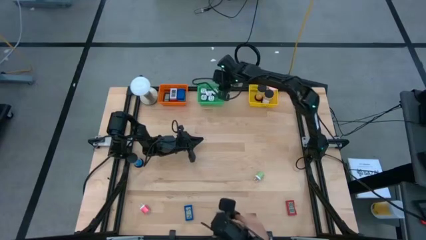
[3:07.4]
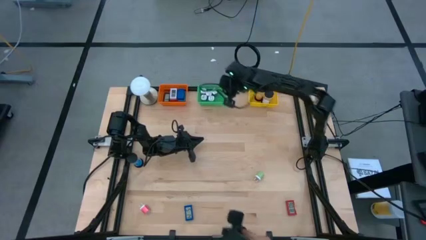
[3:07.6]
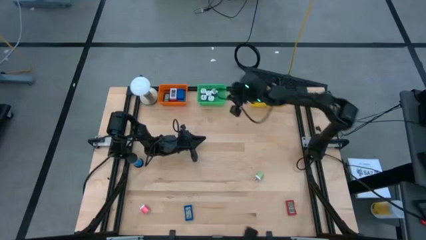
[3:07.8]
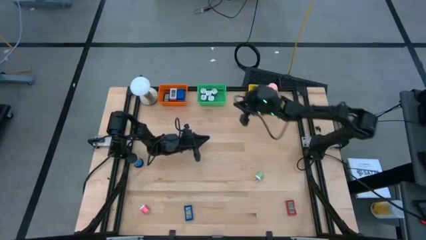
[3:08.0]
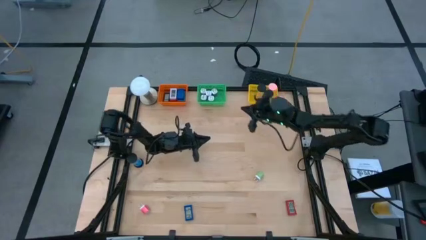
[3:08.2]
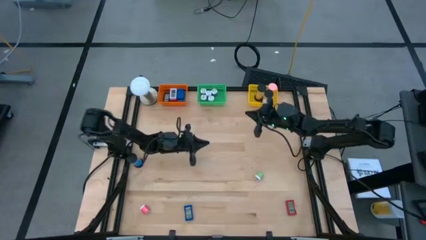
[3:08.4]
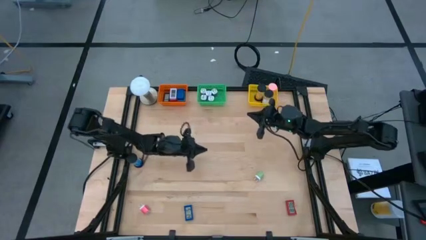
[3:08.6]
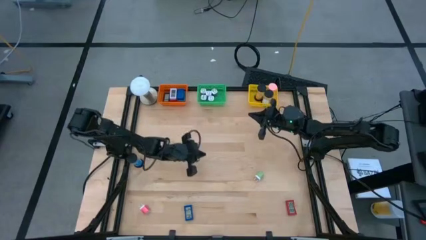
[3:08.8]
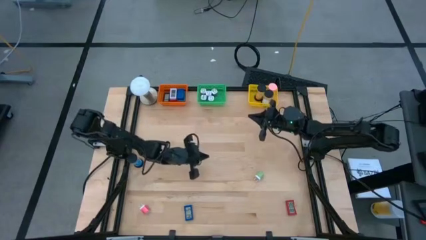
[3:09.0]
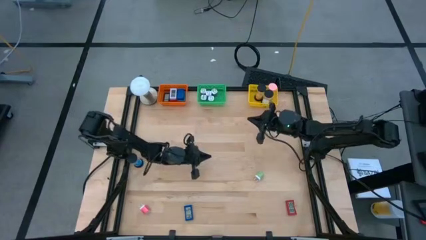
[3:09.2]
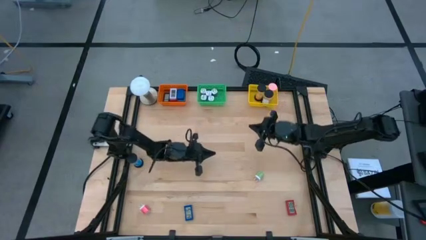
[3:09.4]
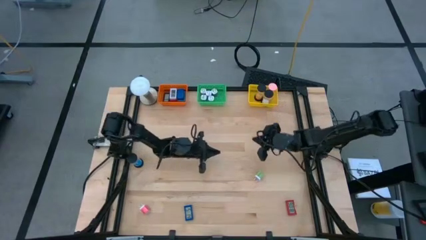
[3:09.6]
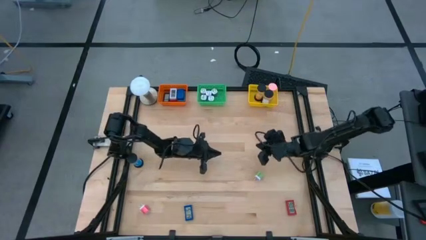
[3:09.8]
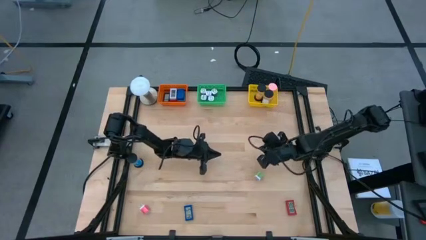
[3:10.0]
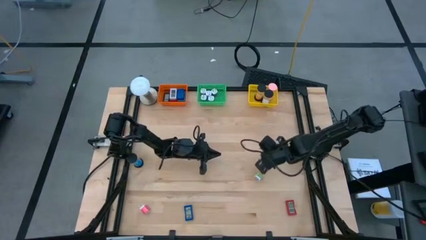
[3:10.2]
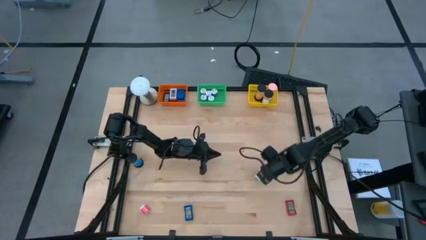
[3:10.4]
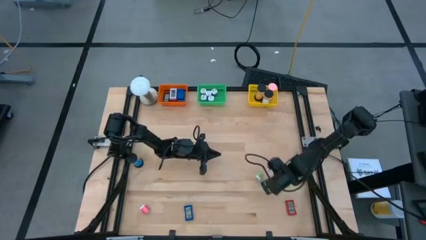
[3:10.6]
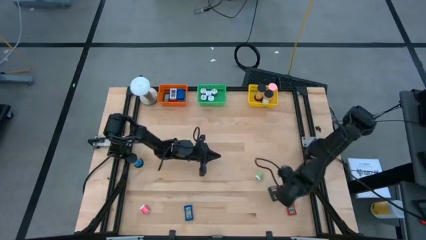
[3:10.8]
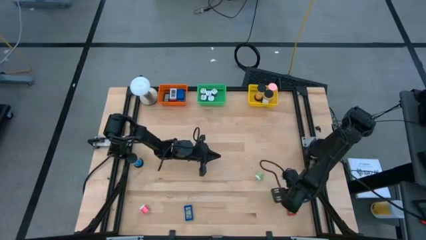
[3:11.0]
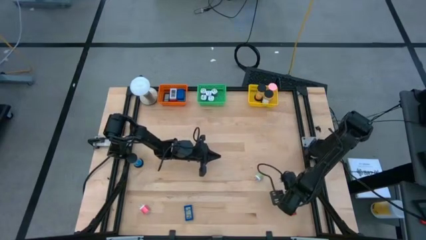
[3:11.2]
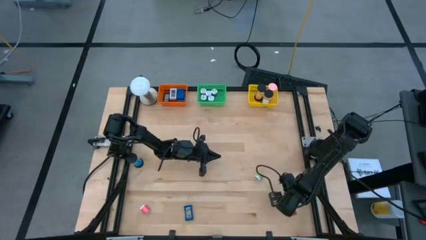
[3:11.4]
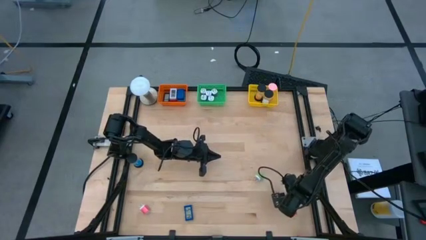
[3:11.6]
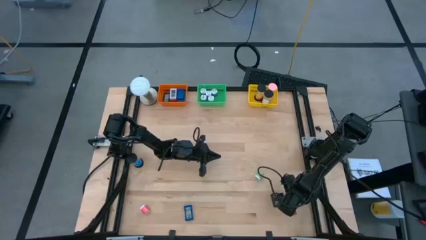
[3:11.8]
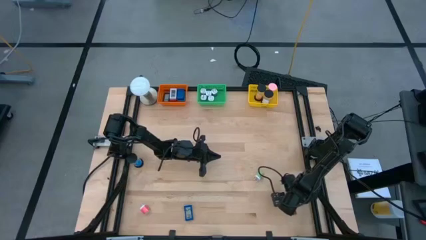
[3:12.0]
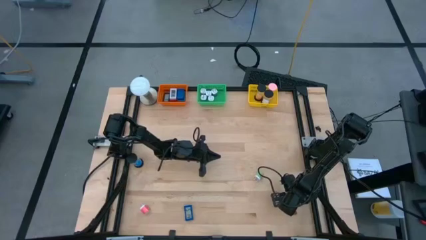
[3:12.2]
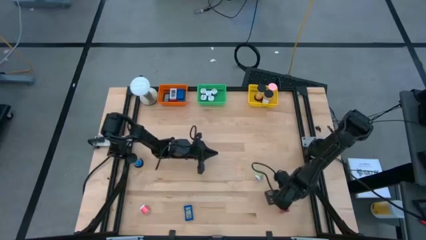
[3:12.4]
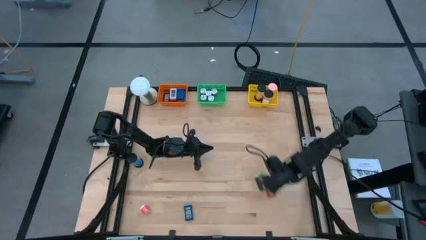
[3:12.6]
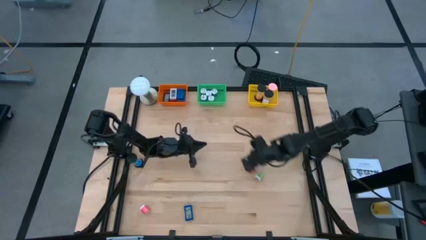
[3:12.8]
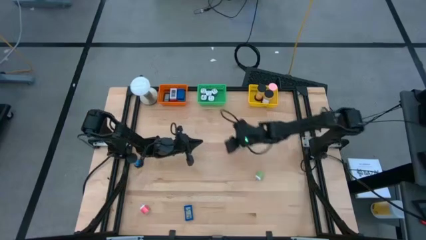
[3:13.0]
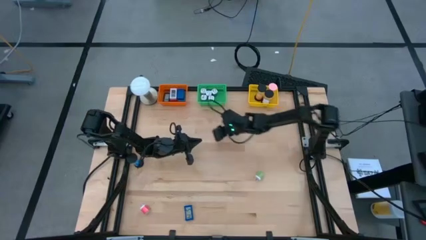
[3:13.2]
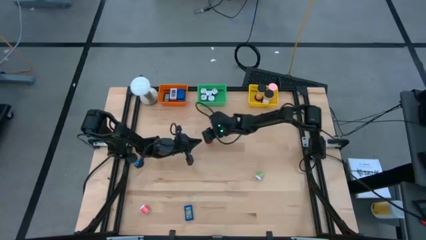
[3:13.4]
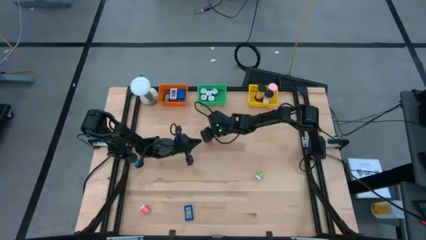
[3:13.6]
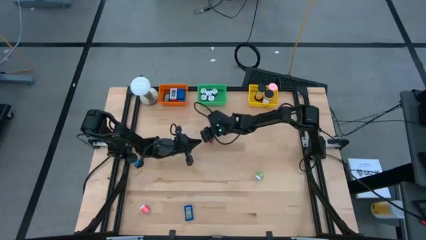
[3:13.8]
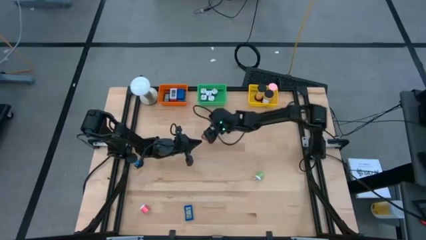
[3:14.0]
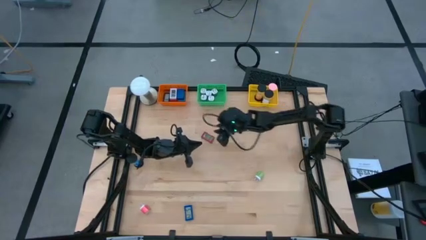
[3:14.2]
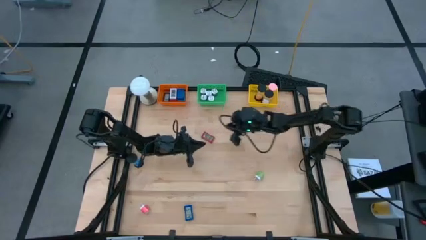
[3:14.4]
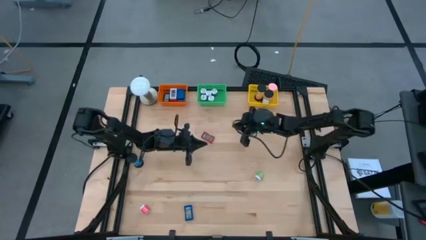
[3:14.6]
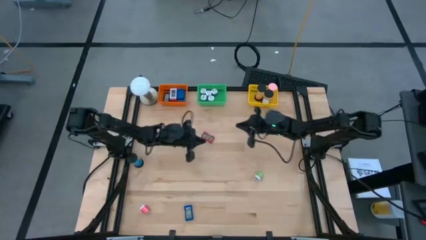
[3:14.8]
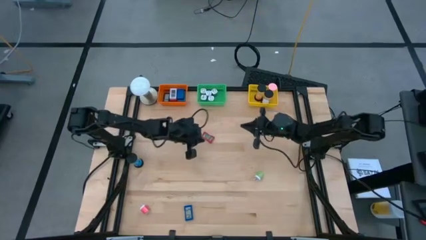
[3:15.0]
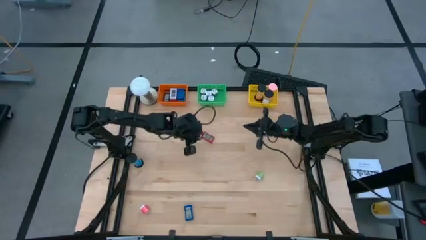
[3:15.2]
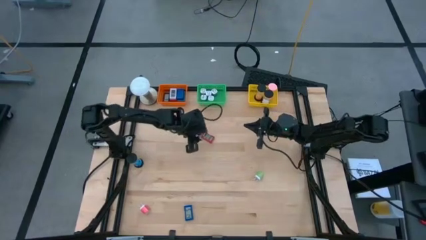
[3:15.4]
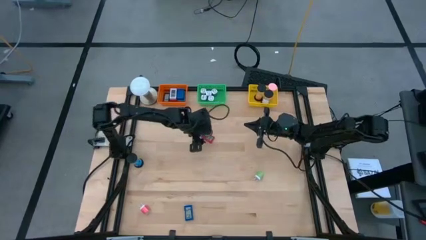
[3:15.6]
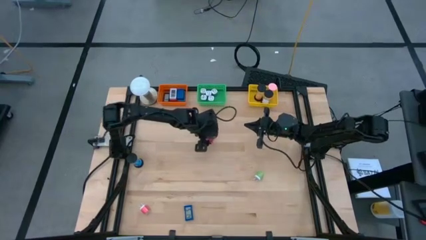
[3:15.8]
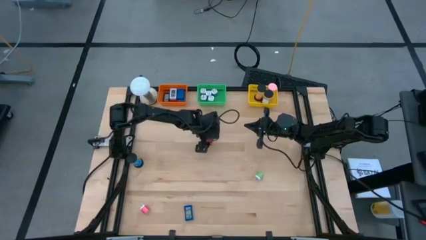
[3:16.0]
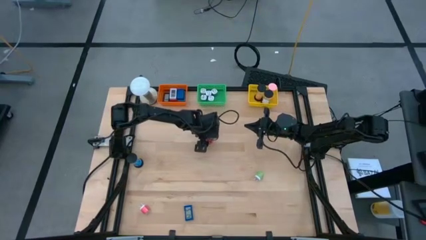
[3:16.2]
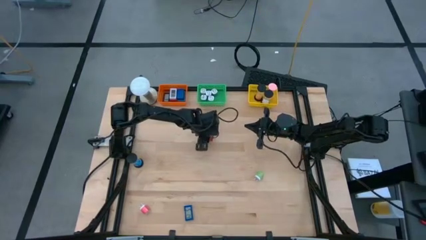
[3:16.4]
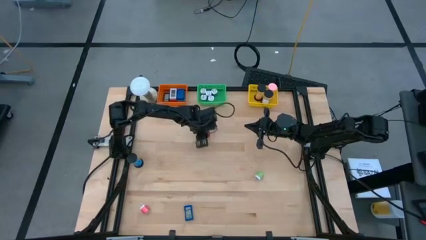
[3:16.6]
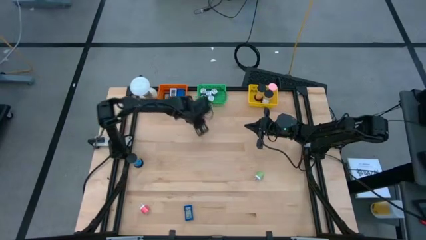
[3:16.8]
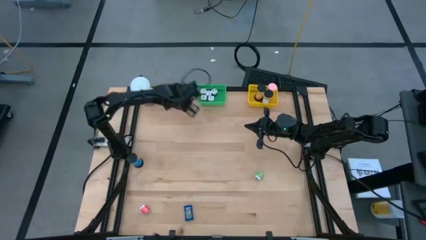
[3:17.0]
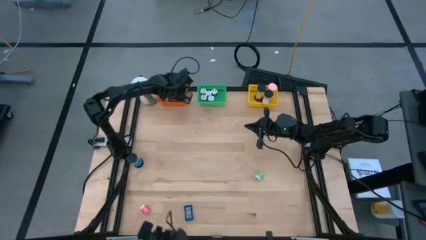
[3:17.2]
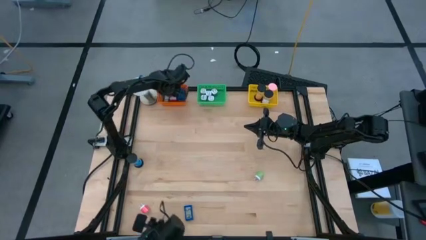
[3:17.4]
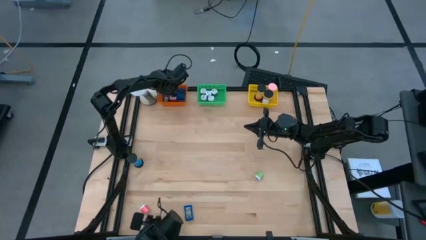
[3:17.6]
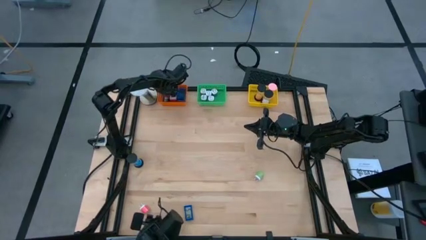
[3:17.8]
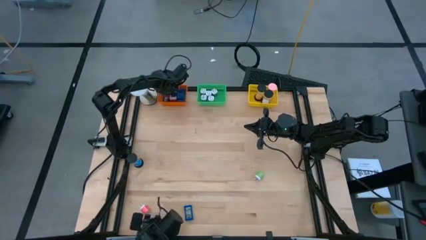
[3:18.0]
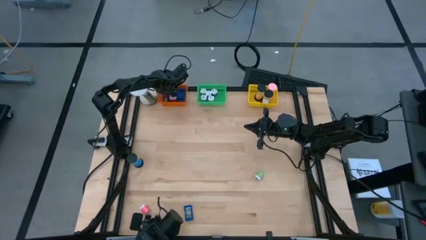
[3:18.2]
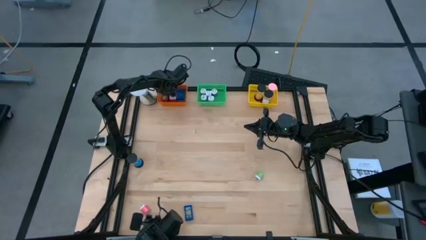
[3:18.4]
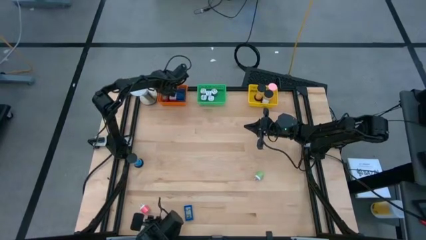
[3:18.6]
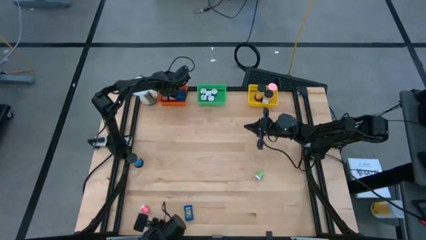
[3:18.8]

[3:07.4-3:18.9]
Task: Pick & Place Office items
Put the red digital clock into the orange basket
